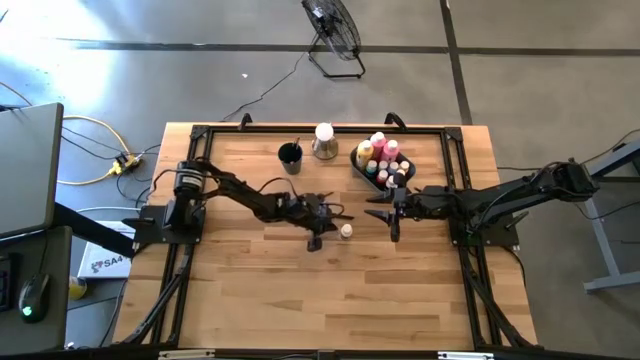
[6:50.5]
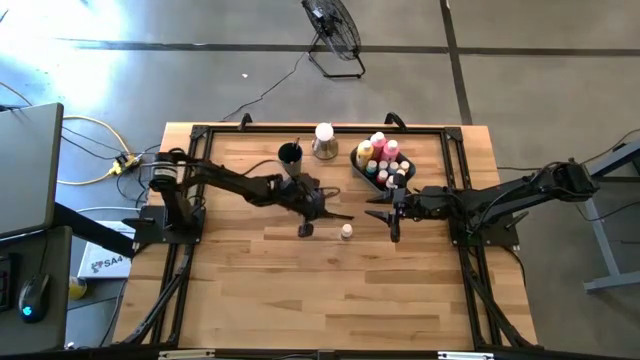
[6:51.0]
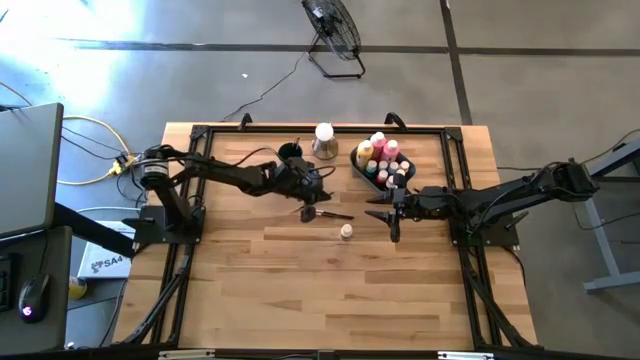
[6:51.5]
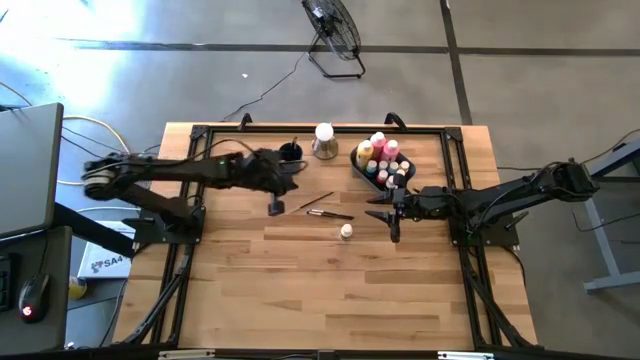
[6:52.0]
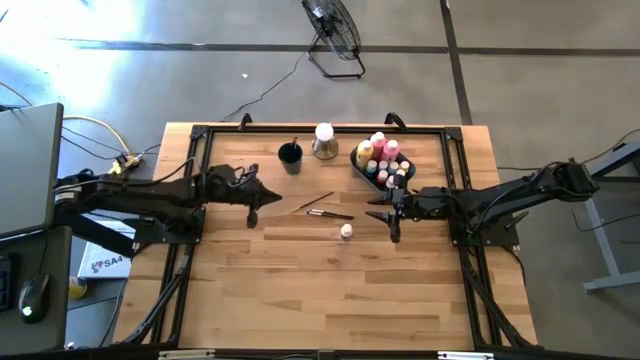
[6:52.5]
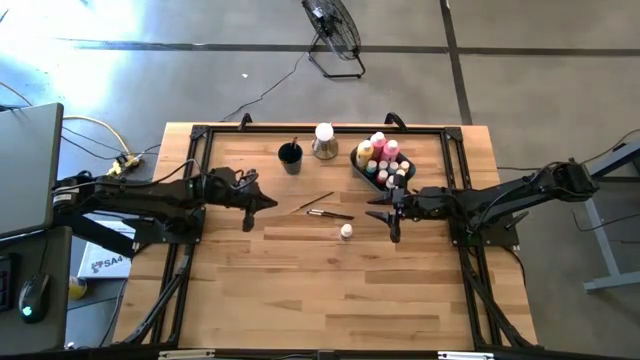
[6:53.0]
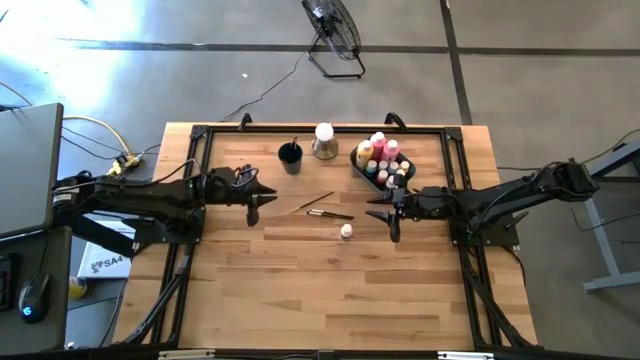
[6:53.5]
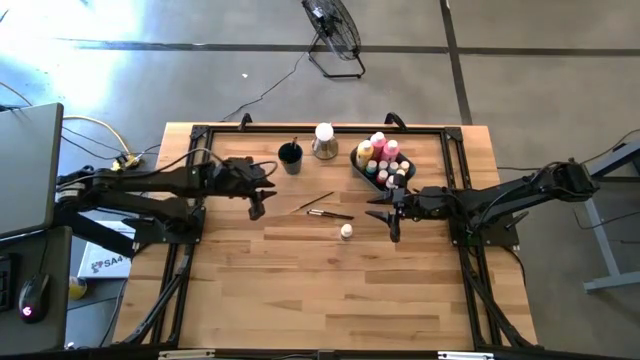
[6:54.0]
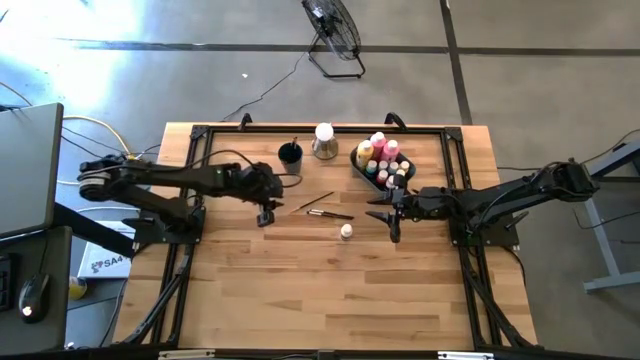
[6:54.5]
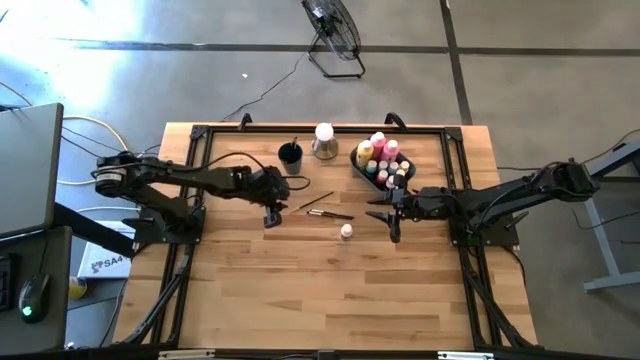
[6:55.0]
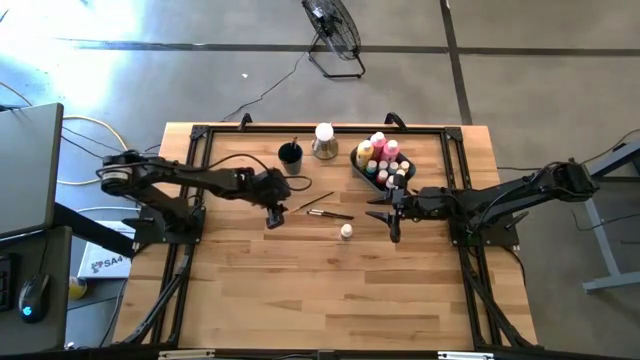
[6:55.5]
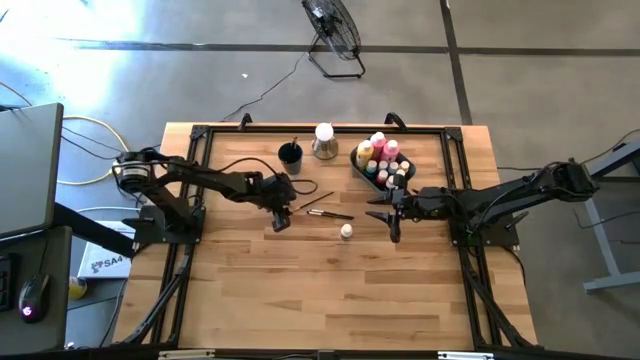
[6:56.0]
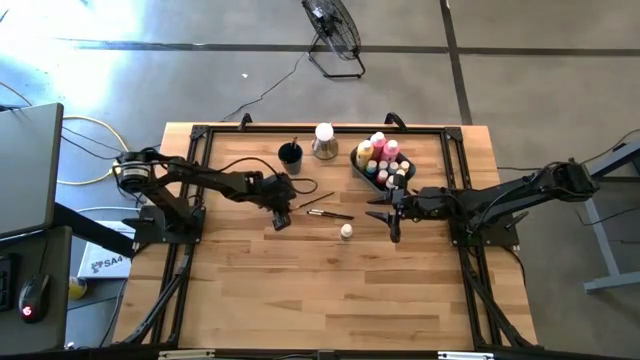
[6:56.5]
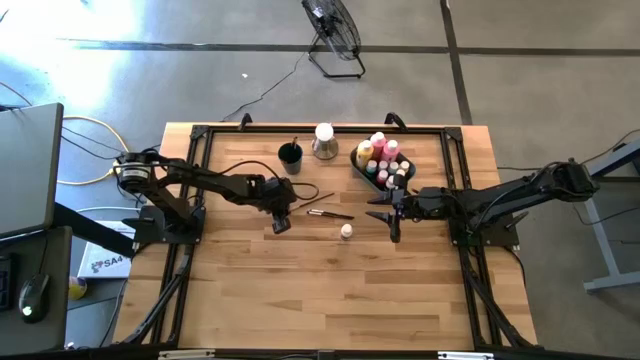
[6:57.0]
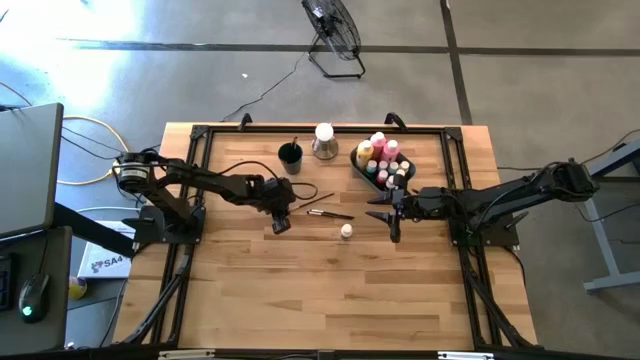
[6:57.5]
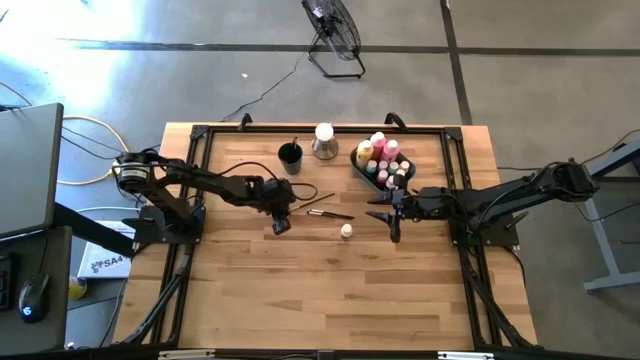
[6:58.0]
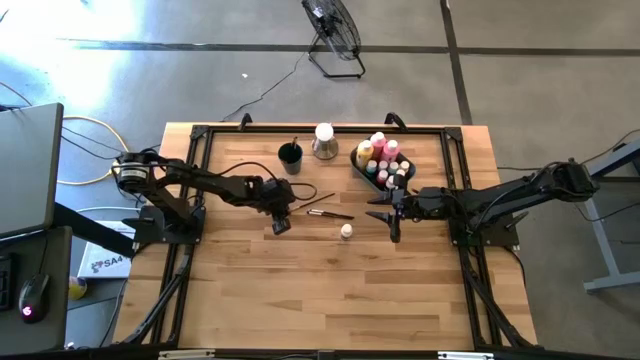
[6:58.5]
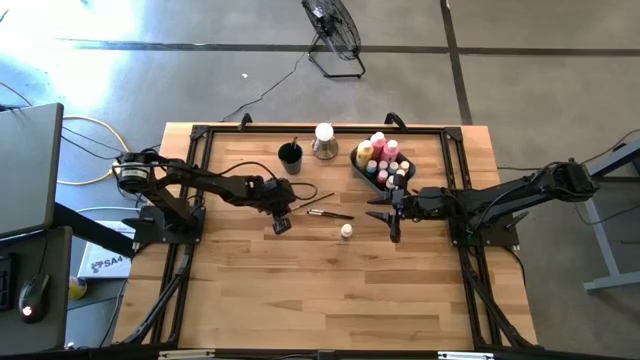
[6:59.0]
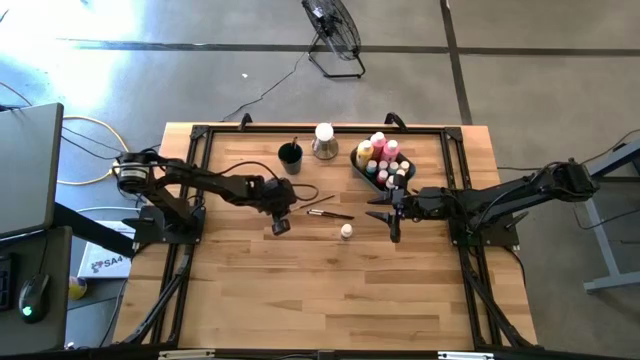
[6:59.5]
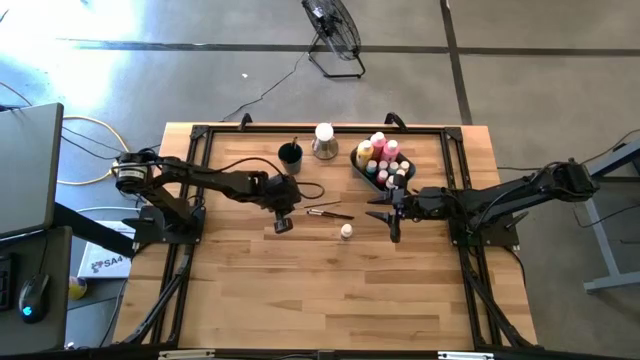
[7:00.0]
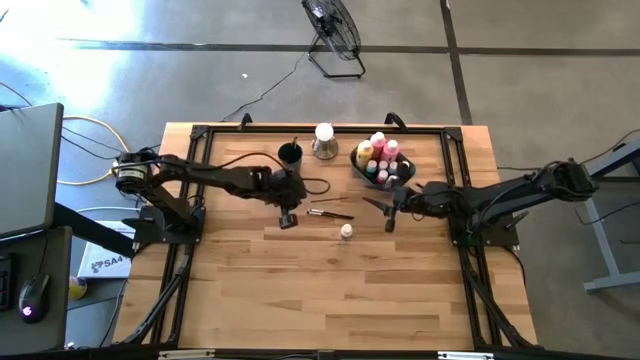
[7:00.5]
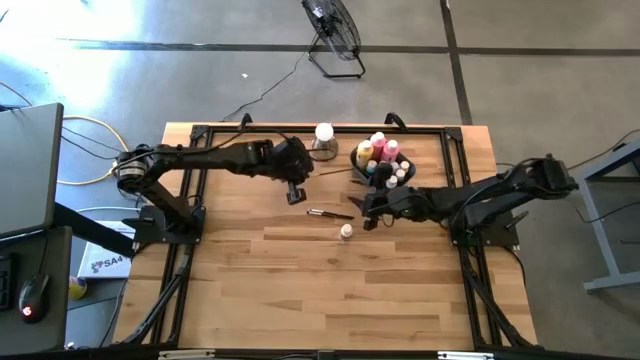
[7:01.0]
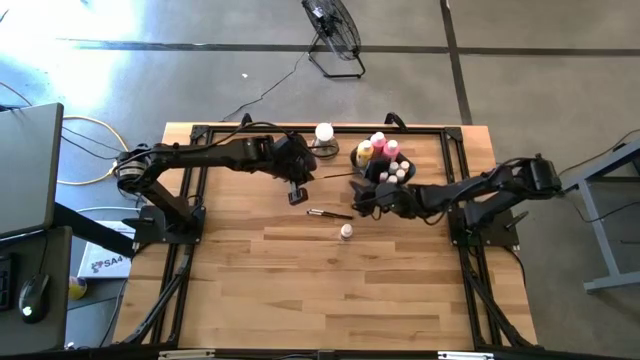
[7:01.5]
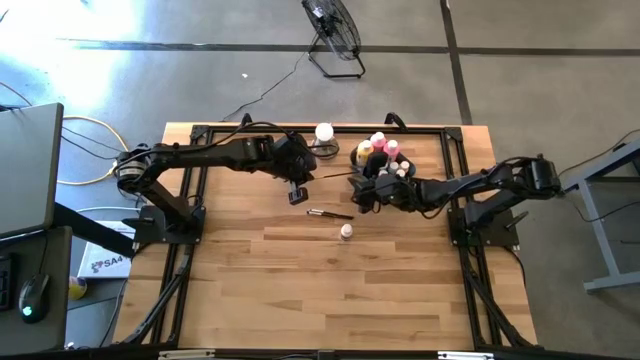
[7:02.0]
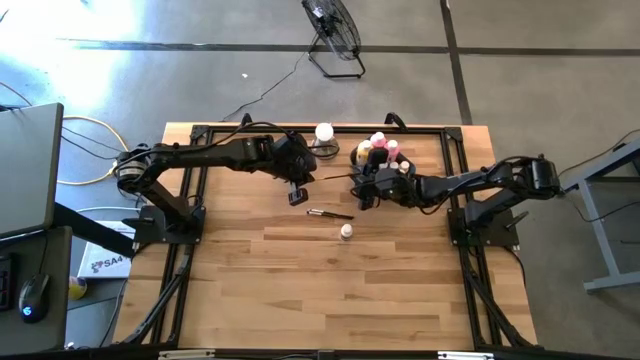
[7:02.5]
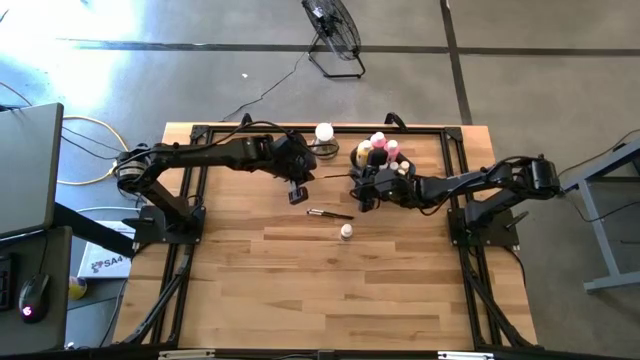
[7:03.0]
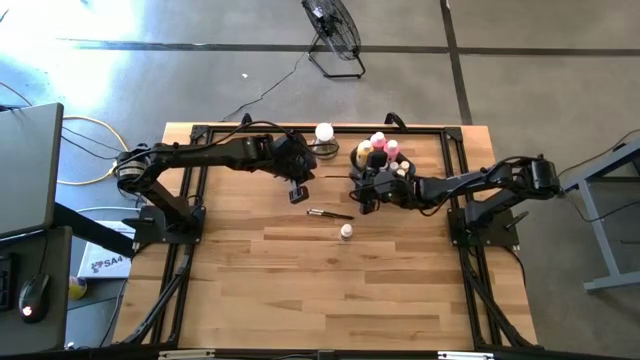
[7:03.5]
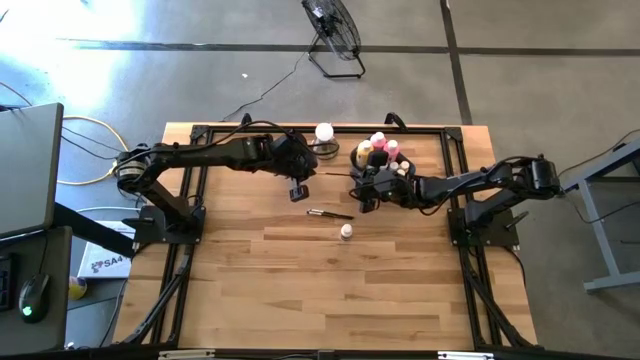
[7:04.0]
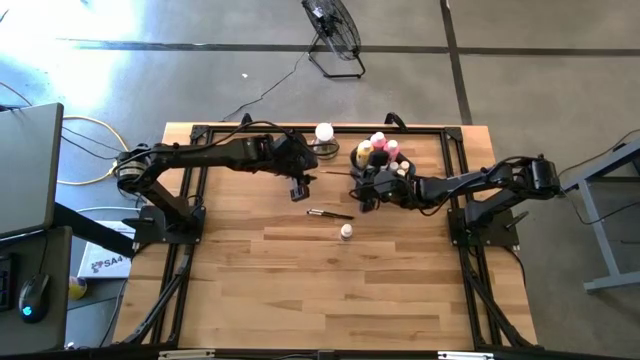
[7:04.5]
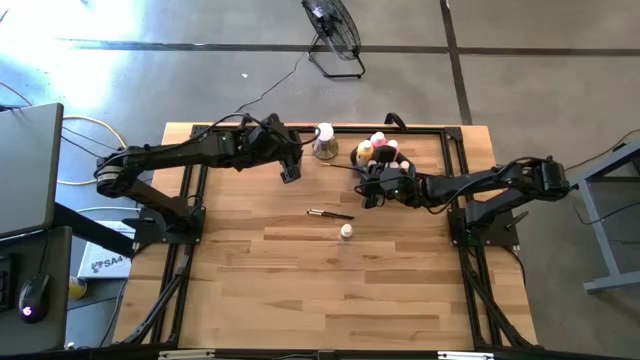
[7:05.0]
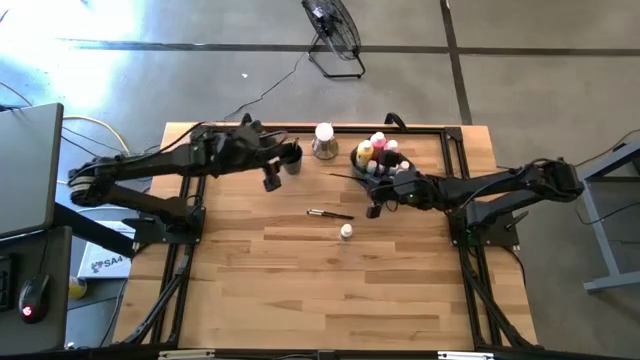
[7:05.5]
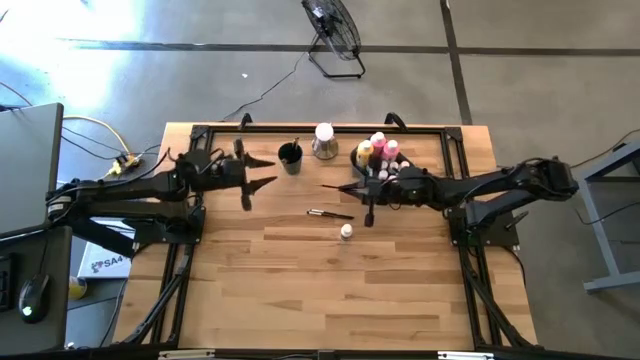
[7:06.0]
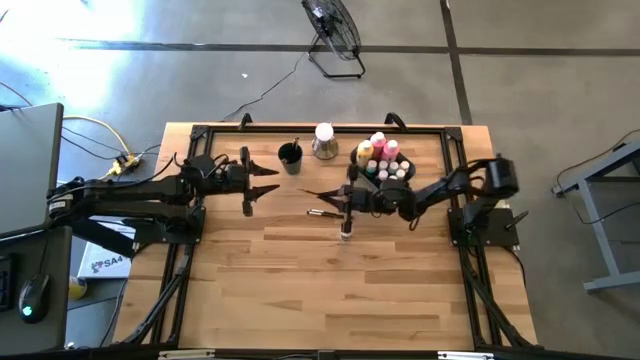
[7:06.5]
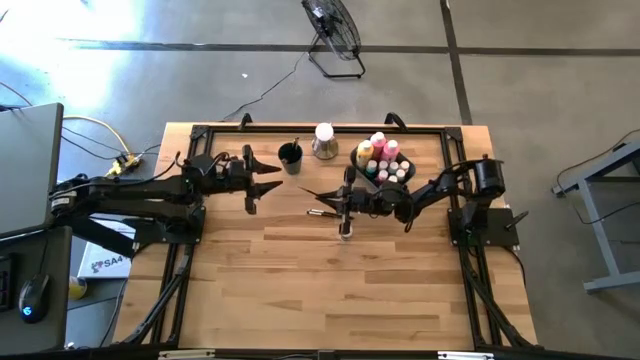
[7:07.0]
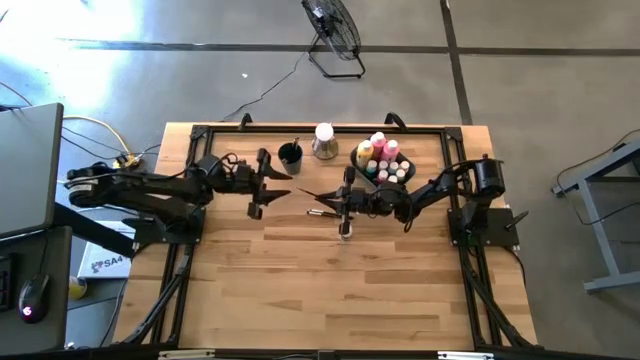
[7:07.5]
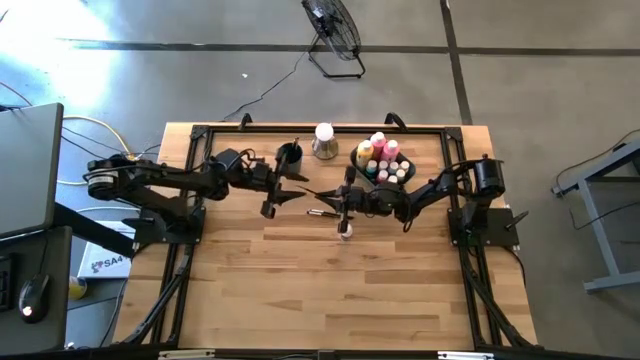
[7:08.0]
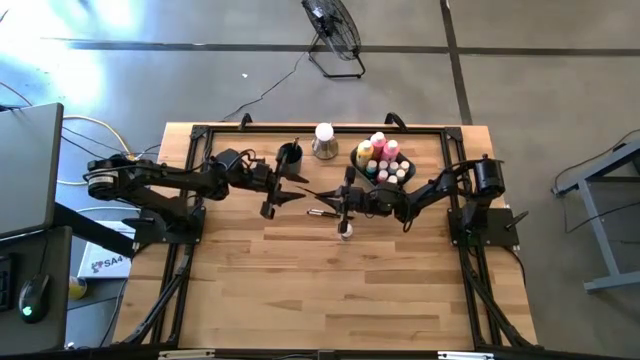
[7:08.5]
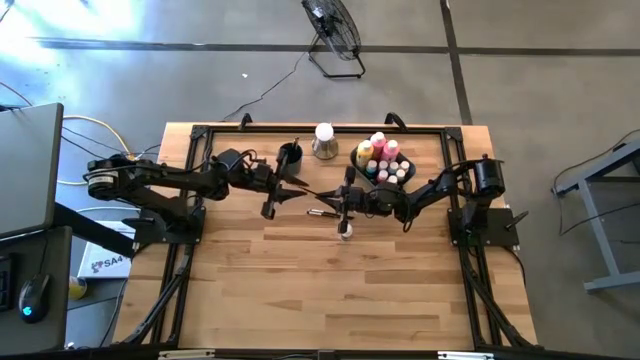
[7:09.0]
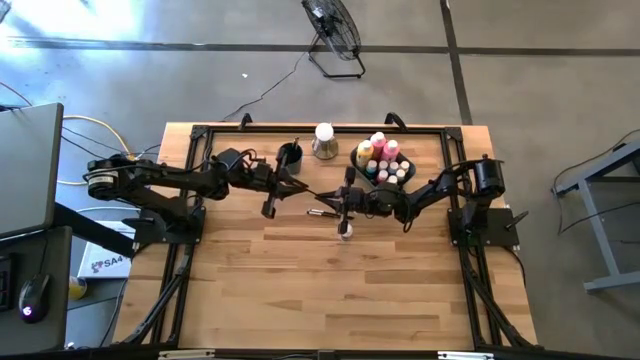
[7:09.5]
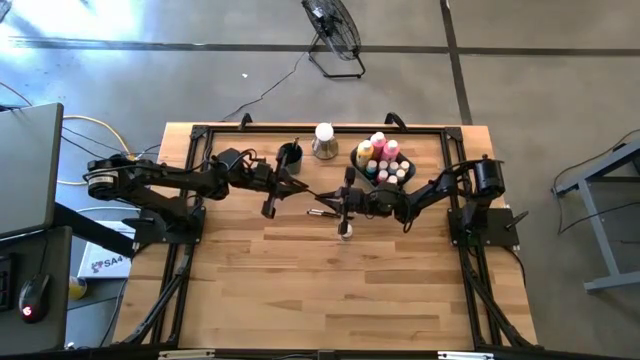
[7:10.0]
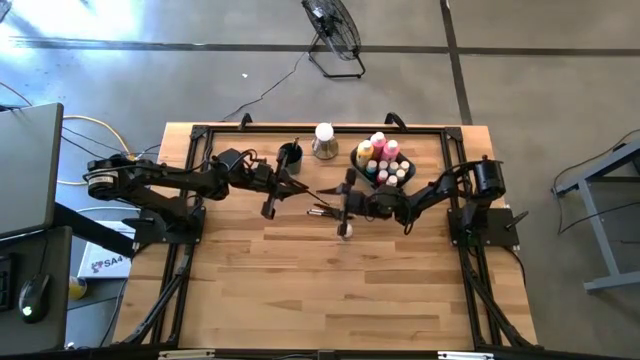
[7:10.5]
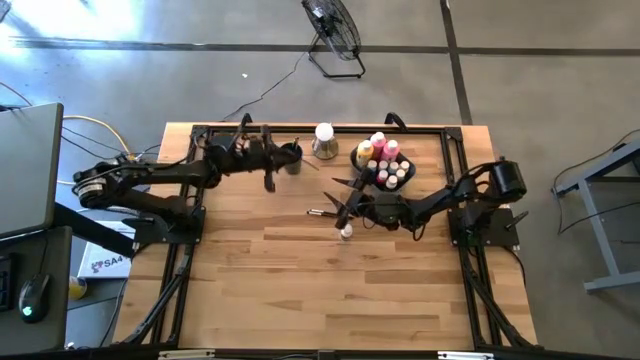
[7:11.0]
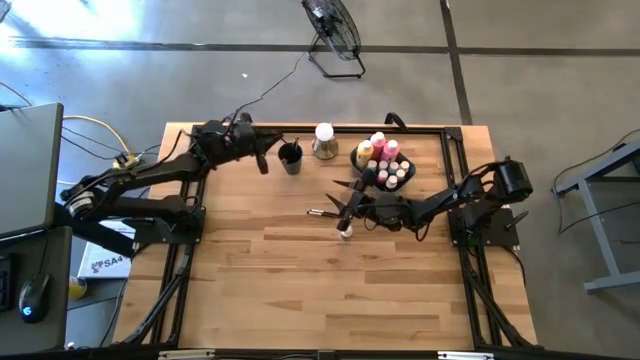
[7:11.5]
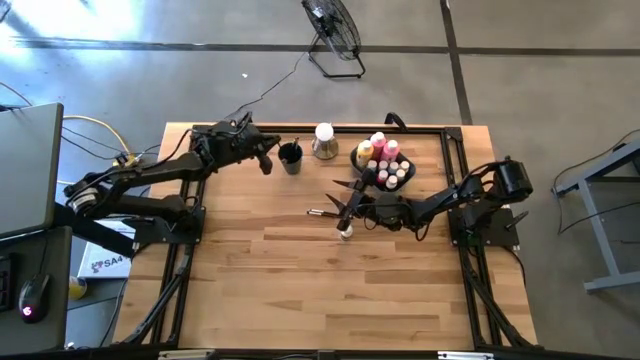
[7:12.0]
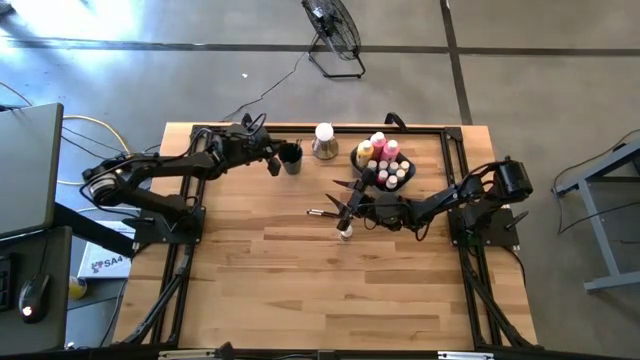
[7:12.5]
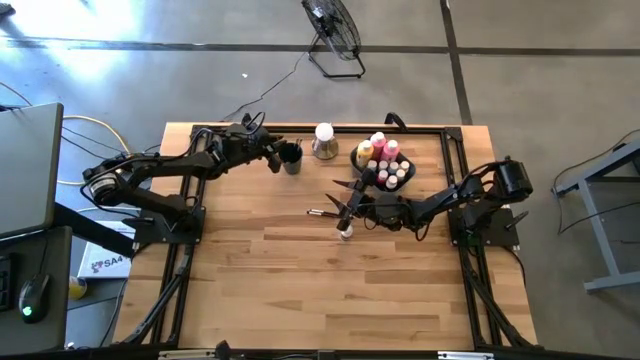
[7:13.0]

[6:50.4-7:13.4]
Task: Pick & Place Paint Supplies
Put the gold paintbrush into the blue cup
